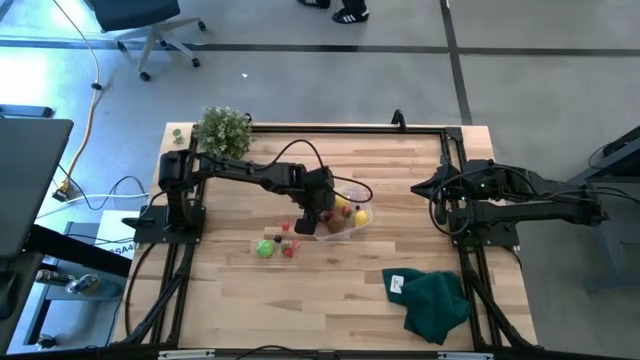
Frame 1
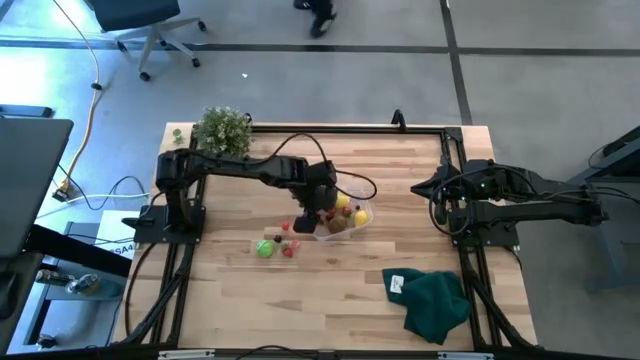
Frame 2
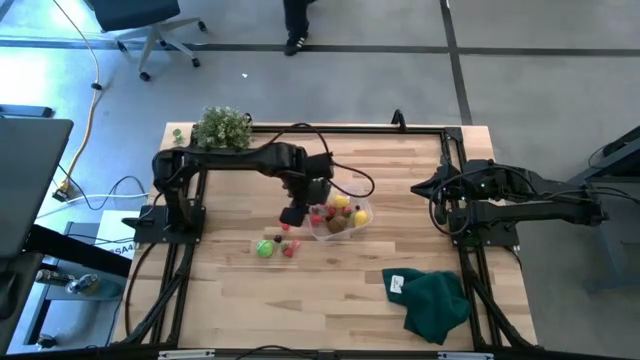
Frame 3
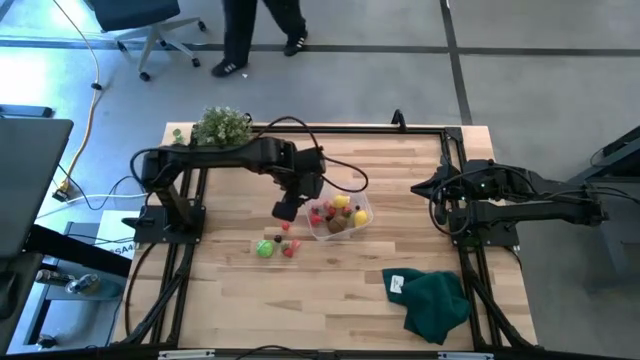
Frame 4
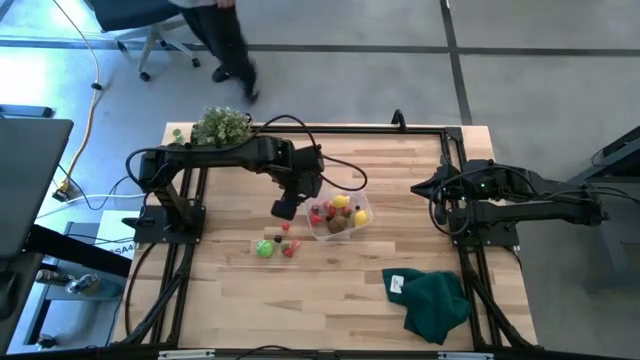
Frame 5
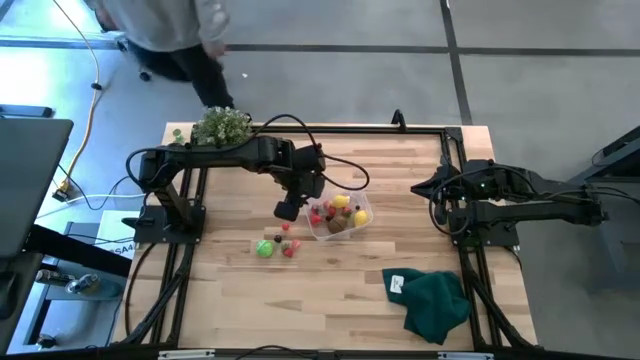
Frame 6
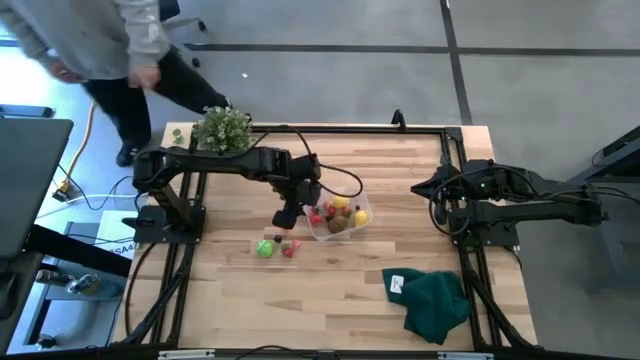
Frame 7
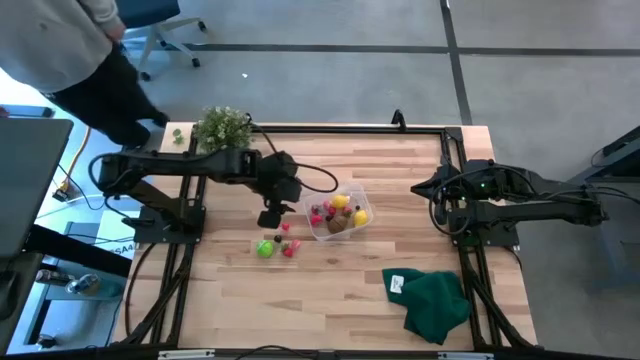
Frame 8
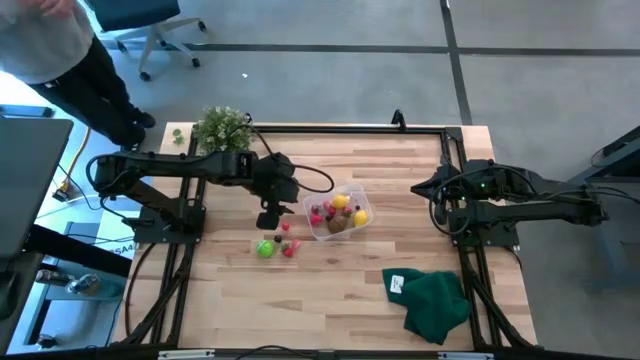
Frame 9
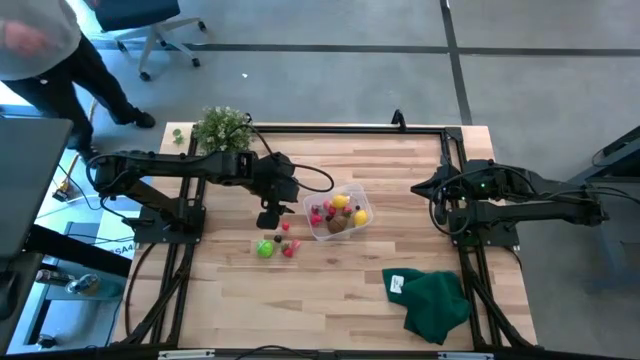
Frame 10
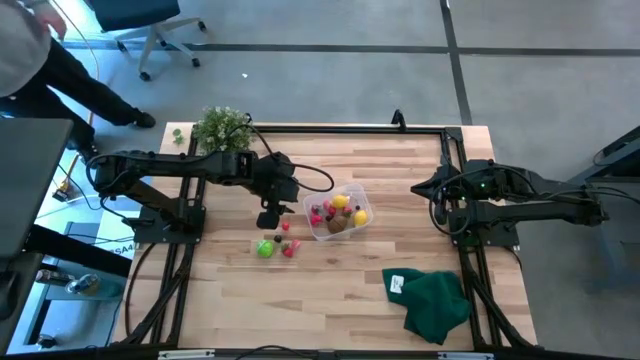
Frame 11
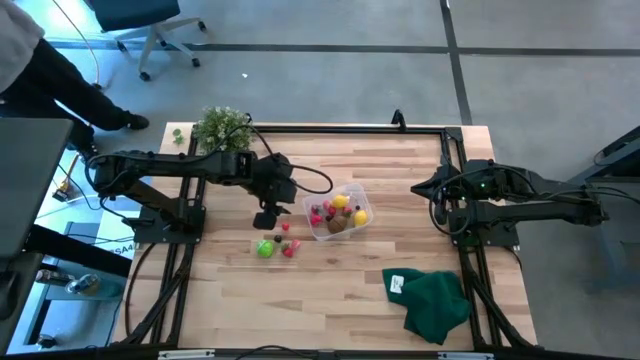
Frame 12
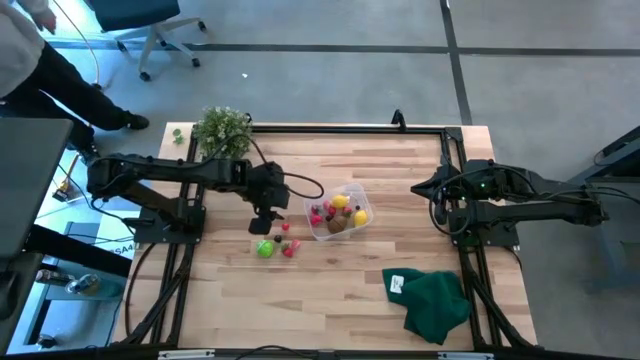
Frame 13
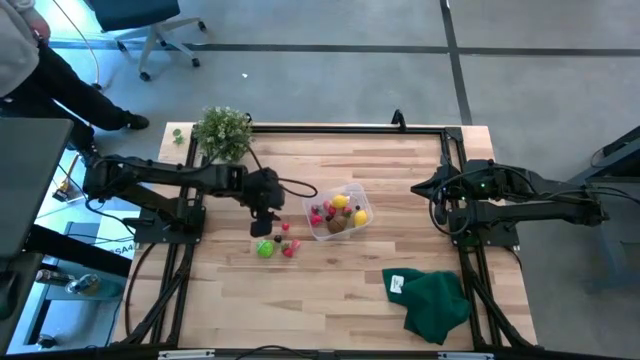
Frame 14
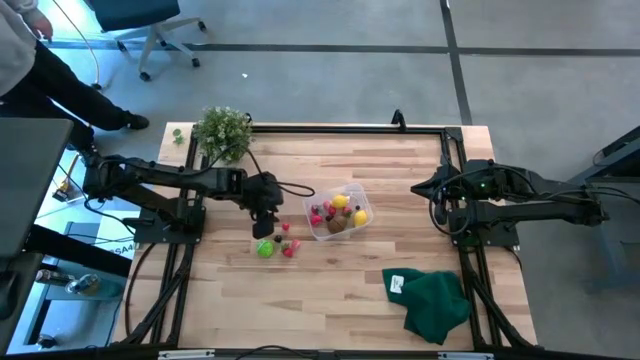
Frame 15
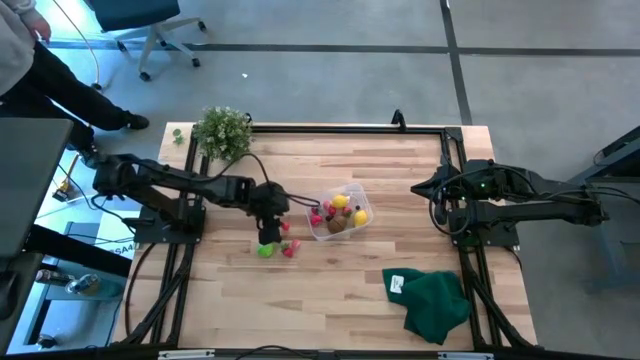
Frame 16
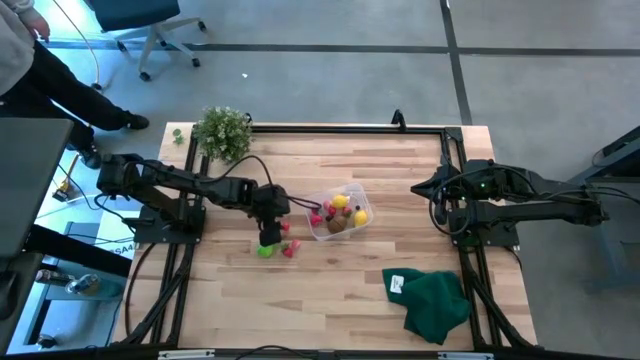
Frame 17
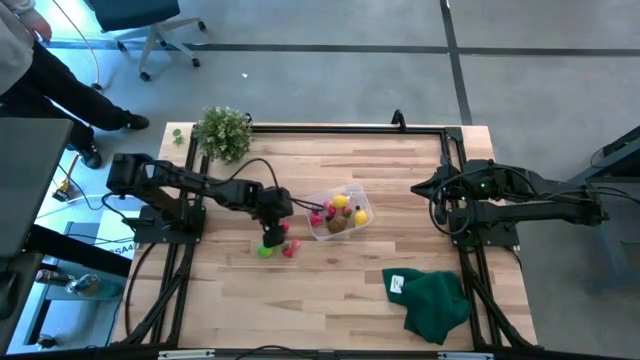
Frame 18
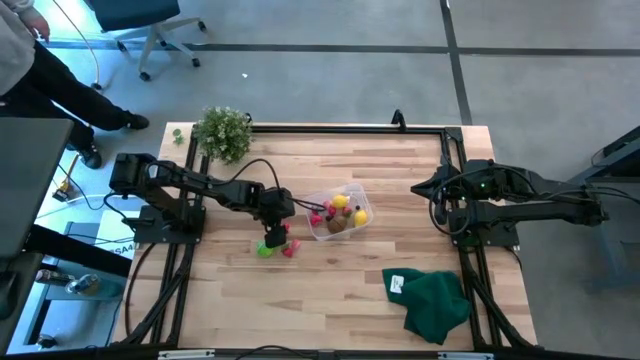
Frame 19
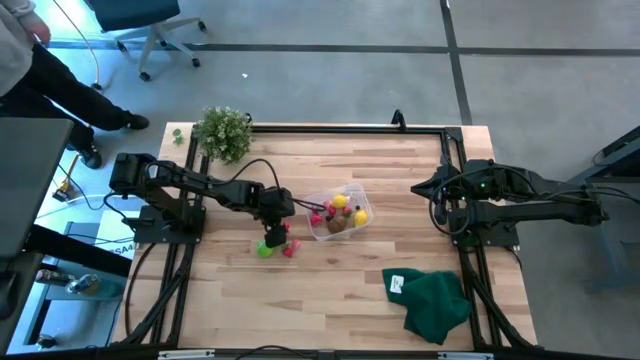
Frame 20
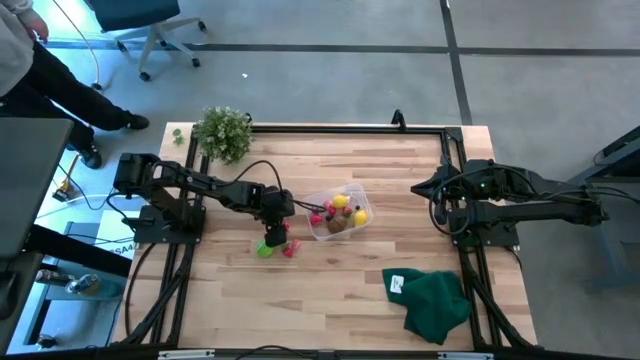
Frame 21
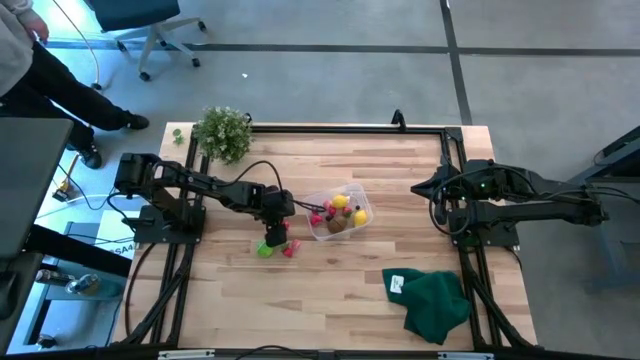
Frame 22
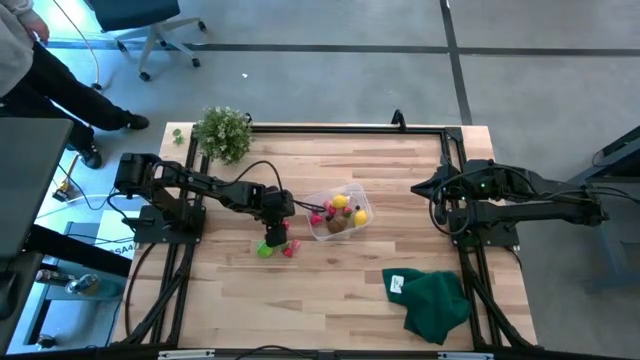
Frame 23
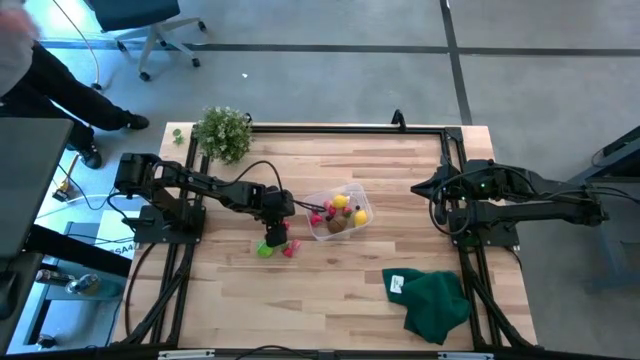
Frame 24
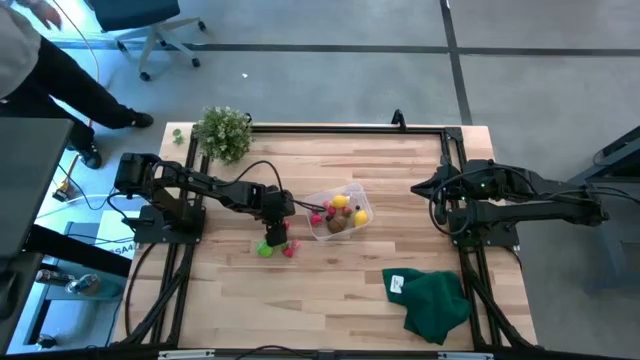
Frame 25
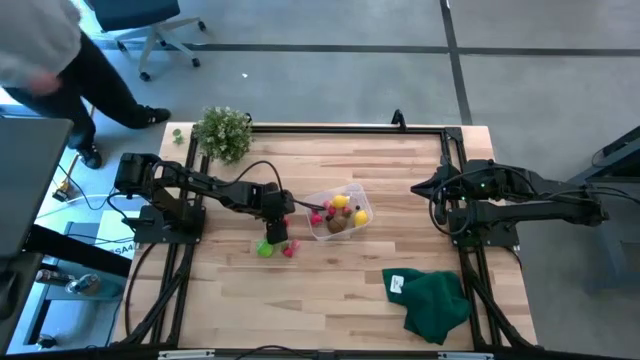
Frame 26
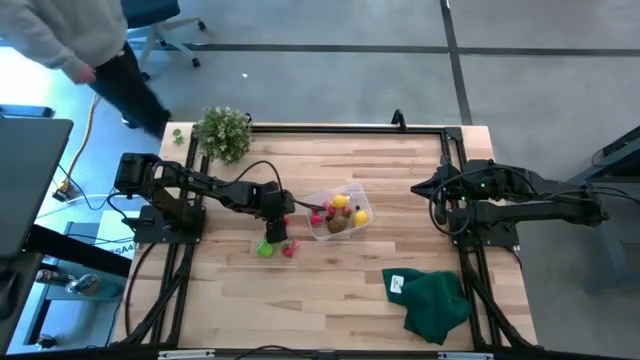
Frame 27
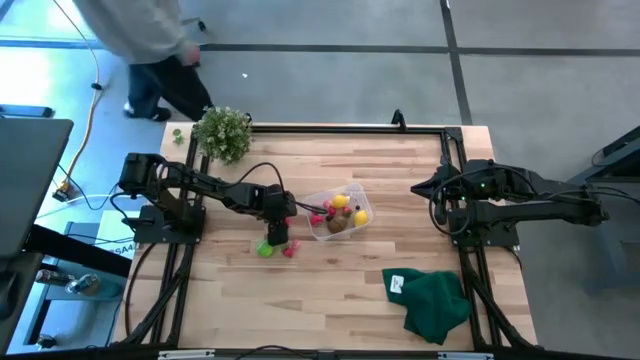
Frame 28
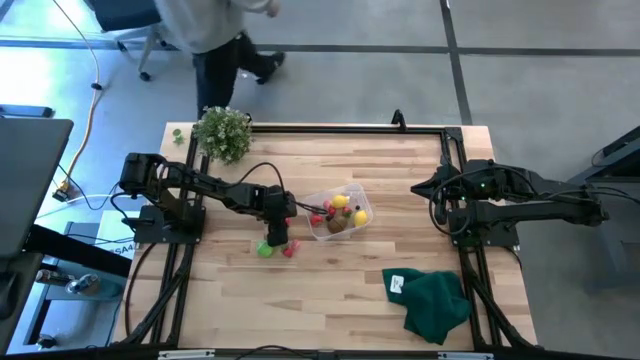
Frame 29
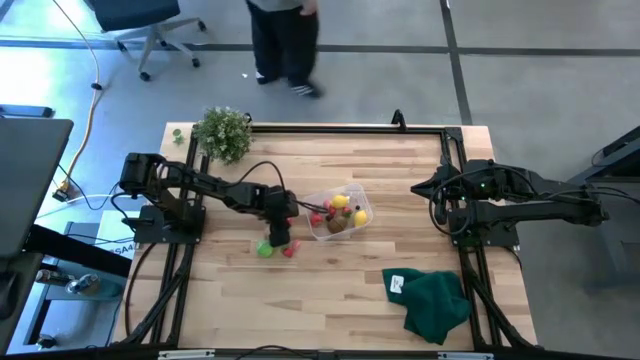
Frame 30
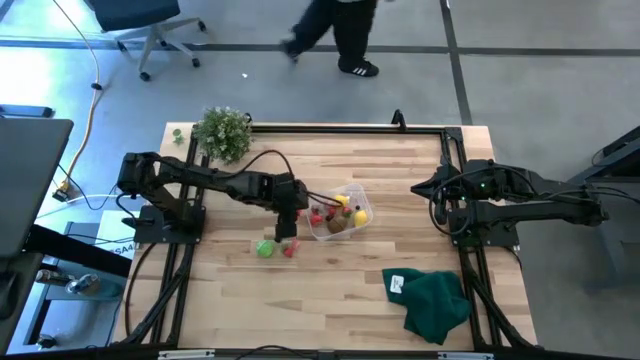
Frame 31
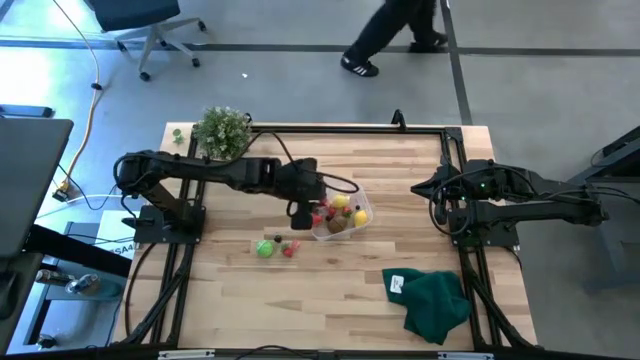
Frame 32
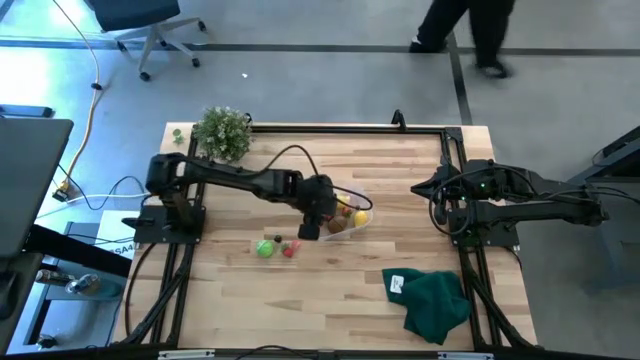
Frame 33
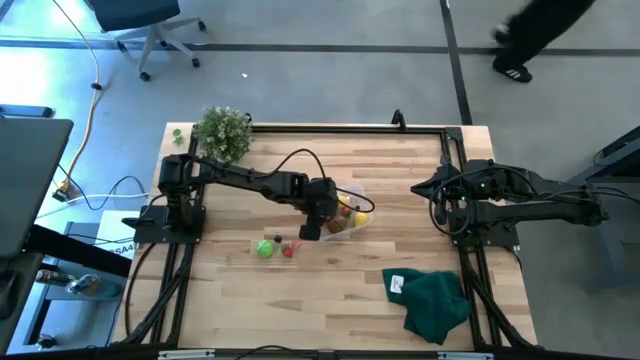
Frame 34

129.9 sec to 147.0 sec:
Task: Pick and placing Produce into tupperware
Put the red cherry into the transparent bin

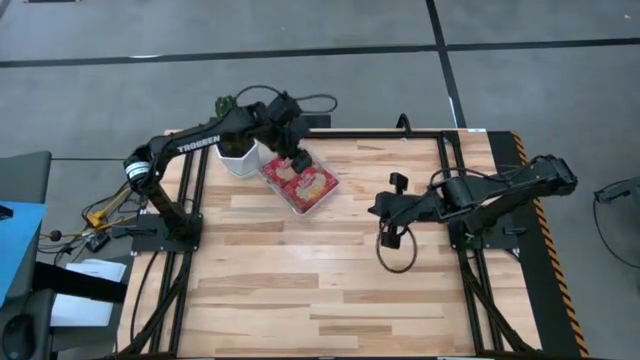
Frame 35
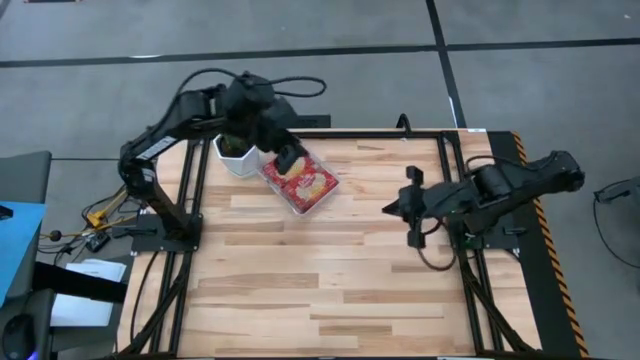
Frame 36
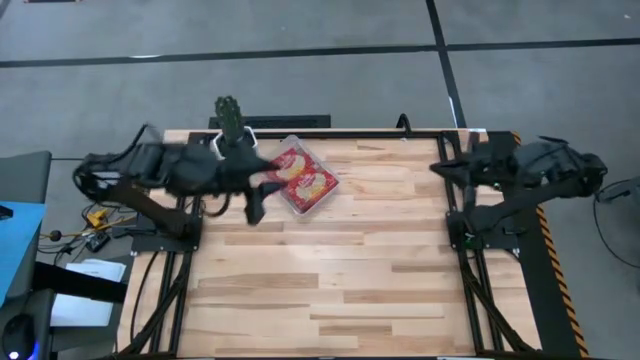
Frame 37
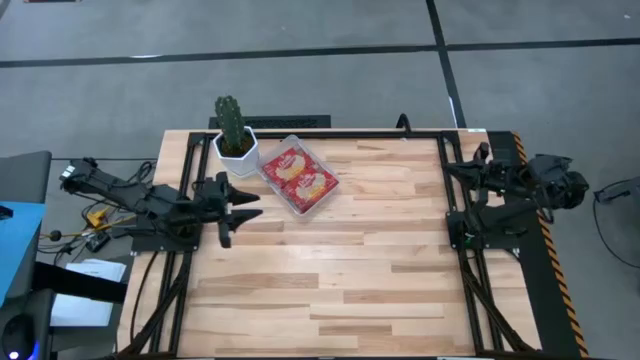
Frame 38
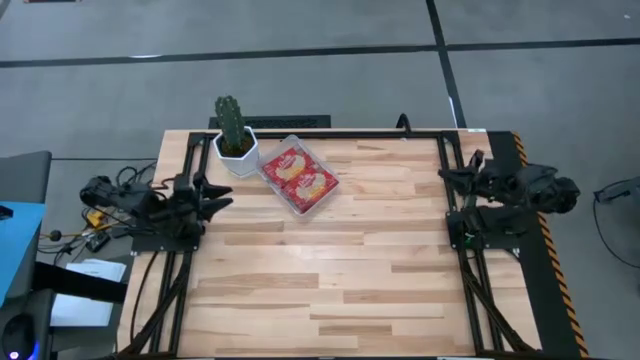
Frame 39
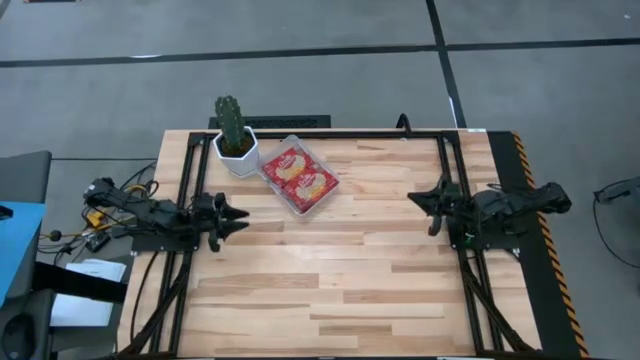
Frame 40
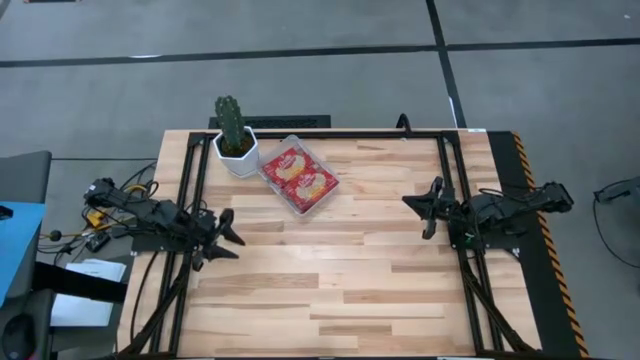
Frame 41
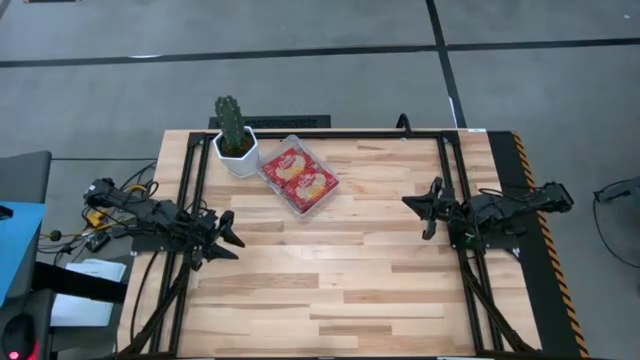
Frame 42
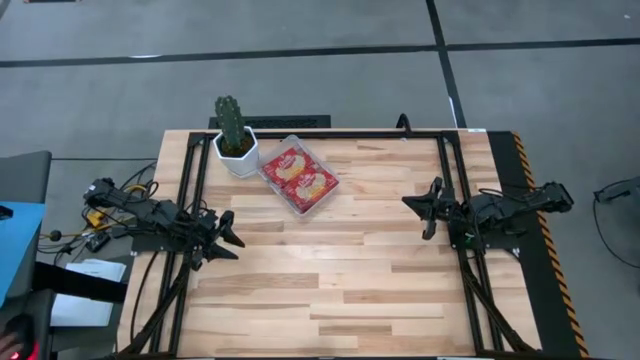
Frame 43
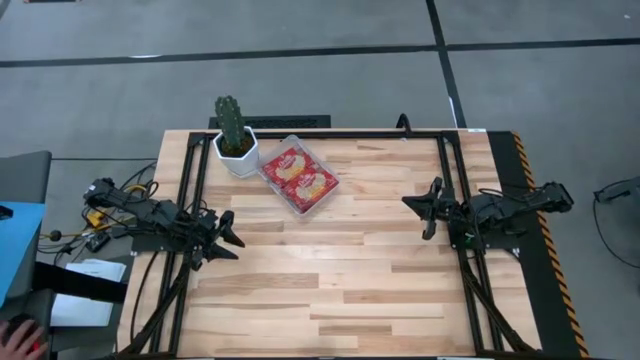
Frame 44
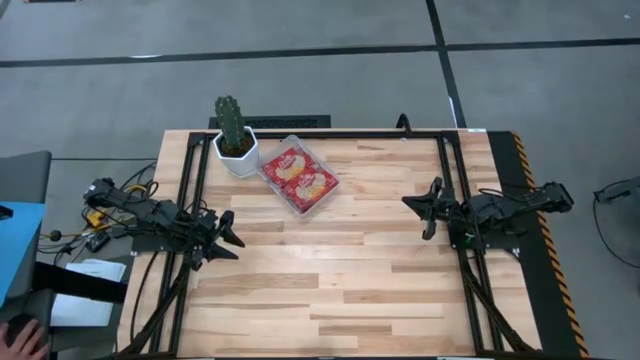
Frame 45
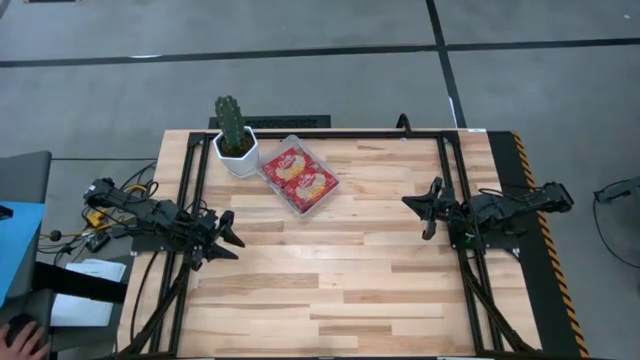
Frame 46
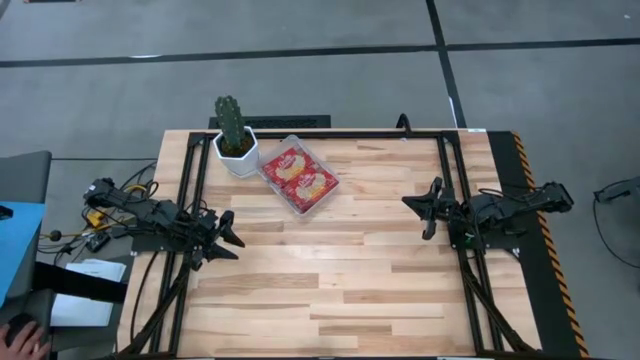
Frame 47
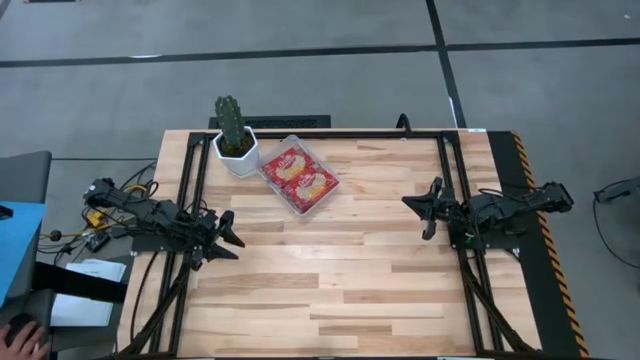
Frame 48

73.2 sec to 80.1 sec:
Task: Sort popcorn bags into baskets
Return to Home Position
